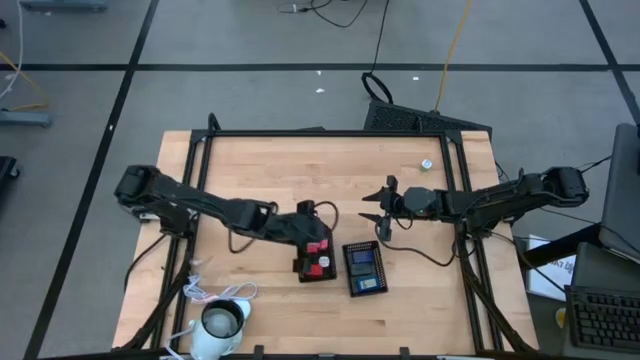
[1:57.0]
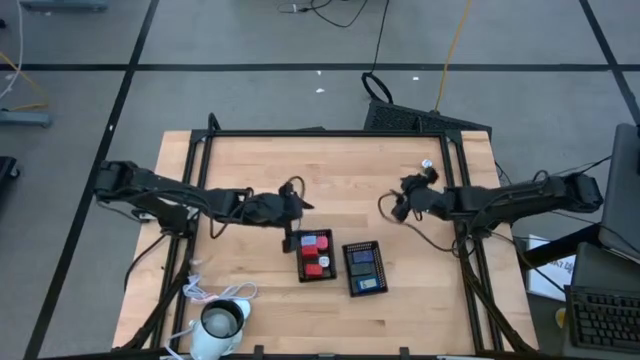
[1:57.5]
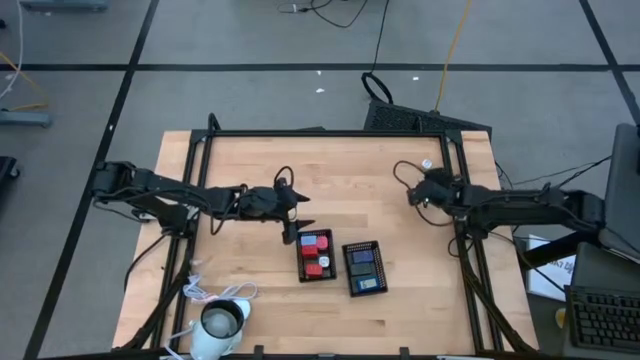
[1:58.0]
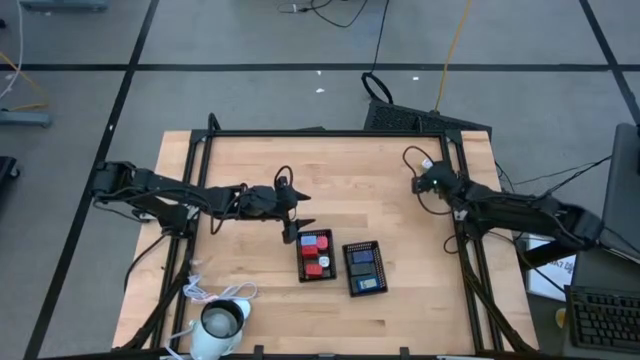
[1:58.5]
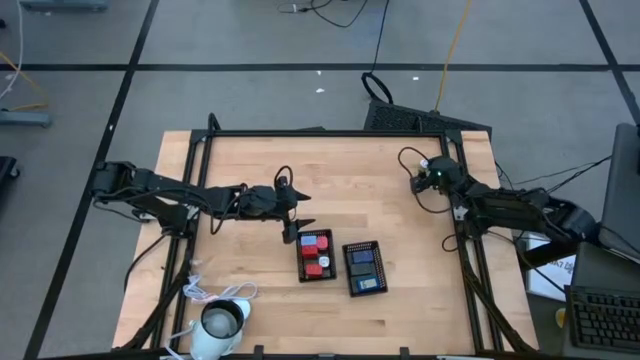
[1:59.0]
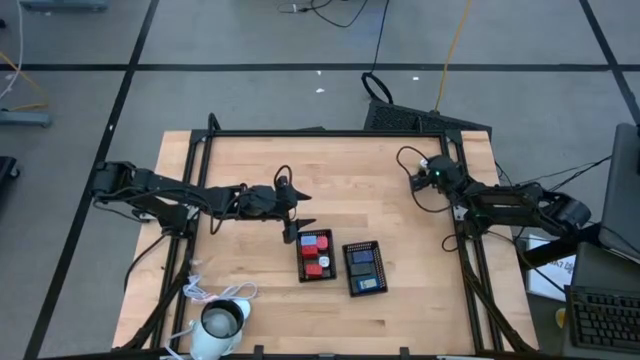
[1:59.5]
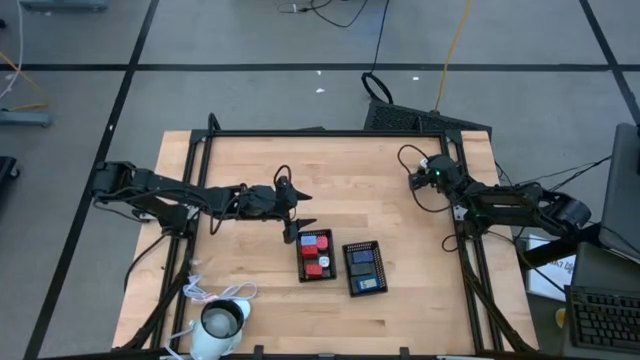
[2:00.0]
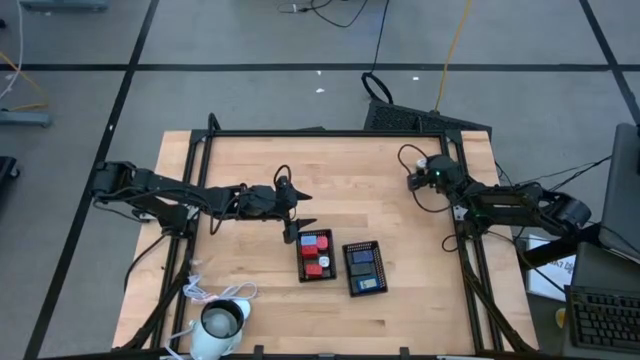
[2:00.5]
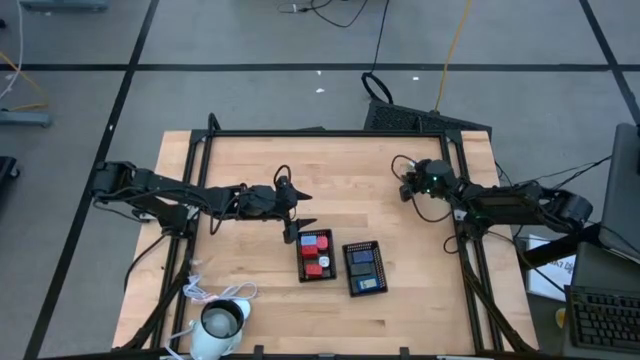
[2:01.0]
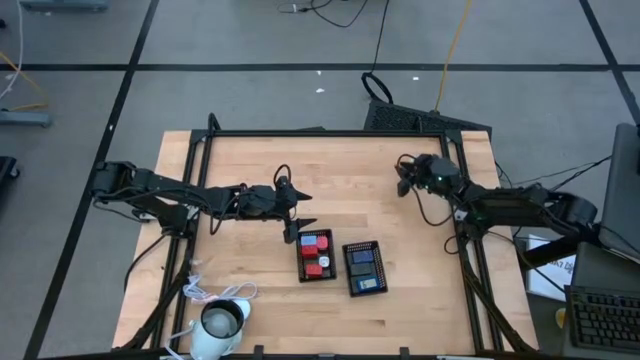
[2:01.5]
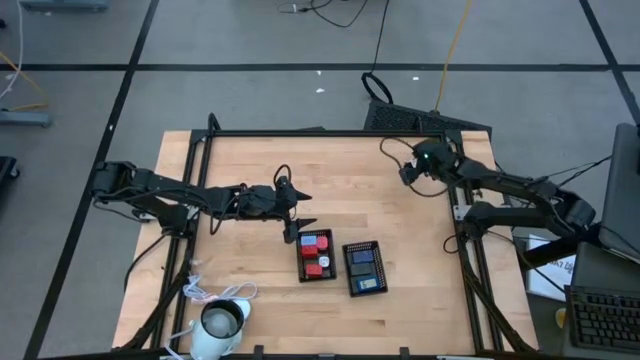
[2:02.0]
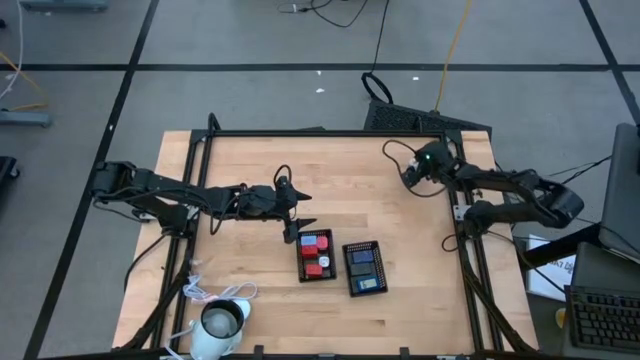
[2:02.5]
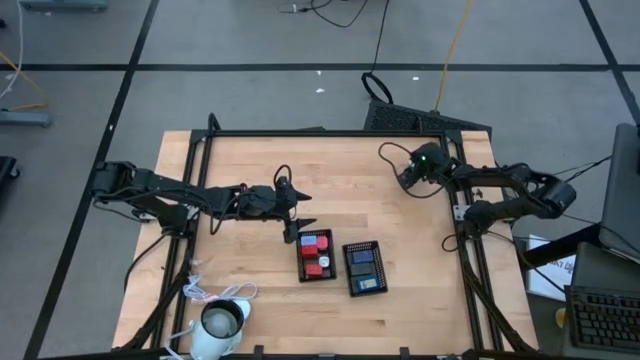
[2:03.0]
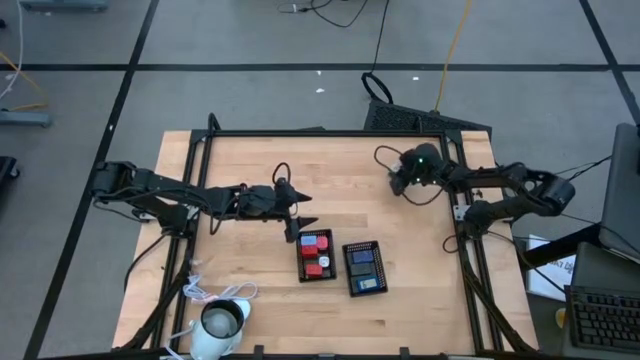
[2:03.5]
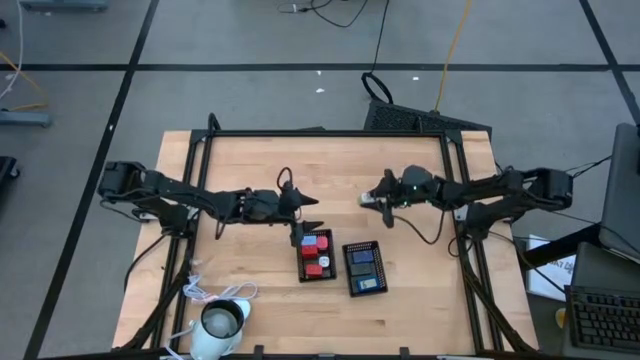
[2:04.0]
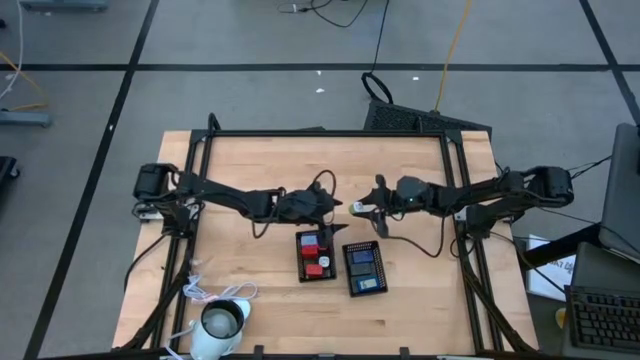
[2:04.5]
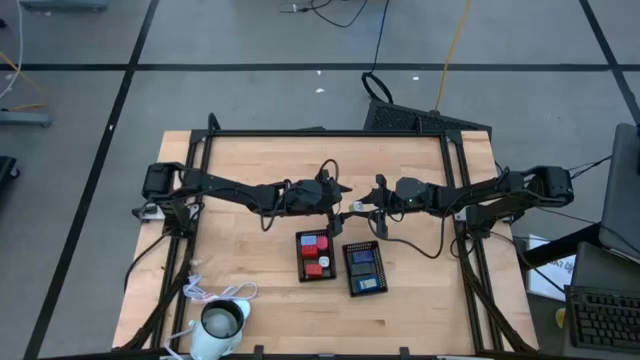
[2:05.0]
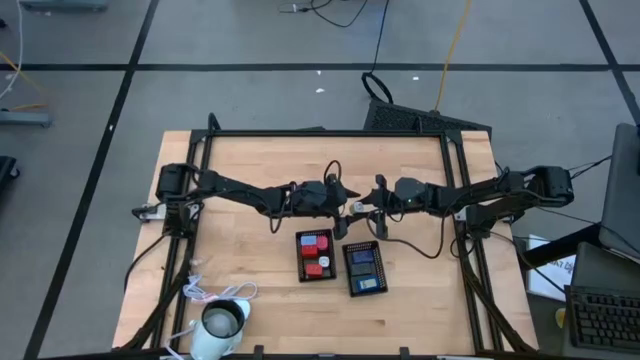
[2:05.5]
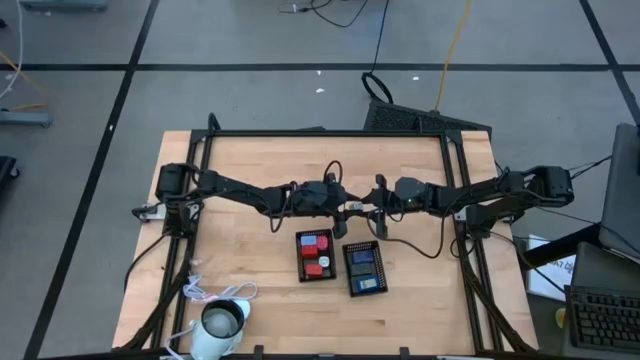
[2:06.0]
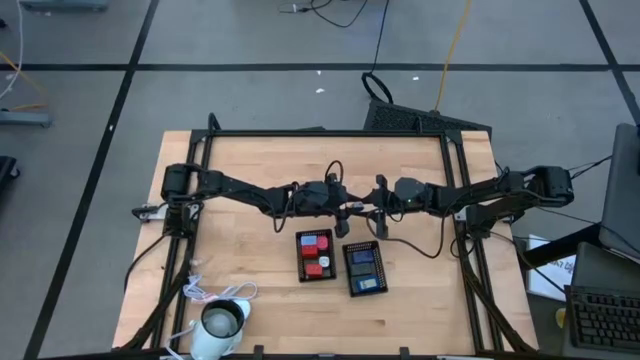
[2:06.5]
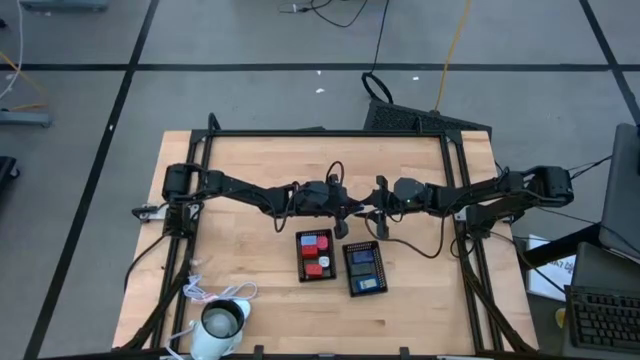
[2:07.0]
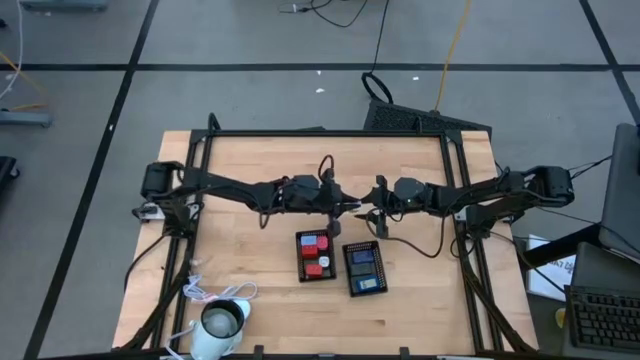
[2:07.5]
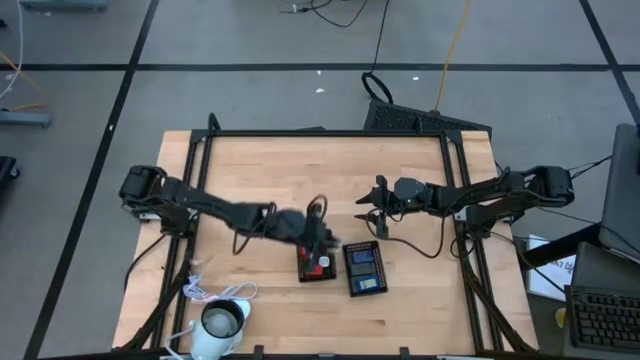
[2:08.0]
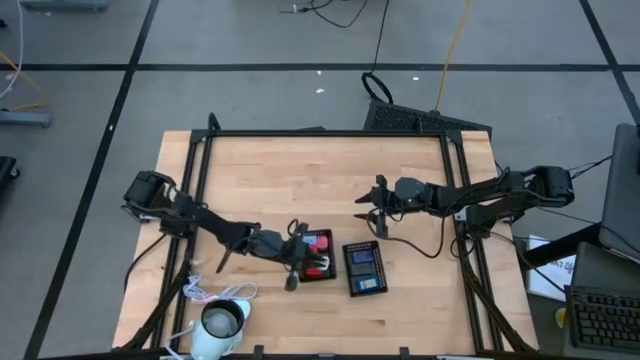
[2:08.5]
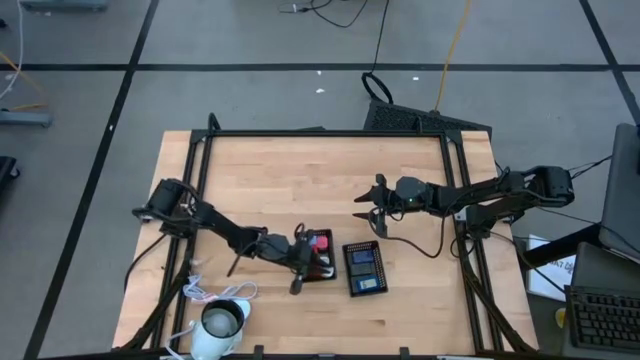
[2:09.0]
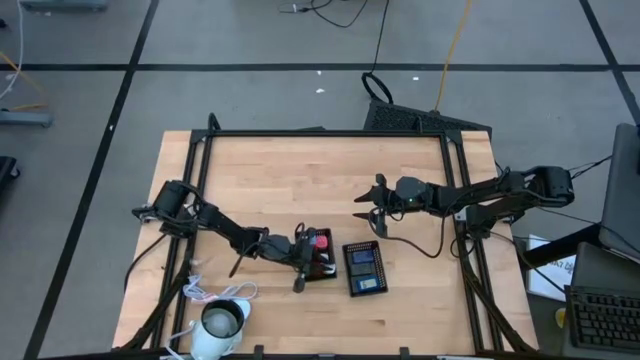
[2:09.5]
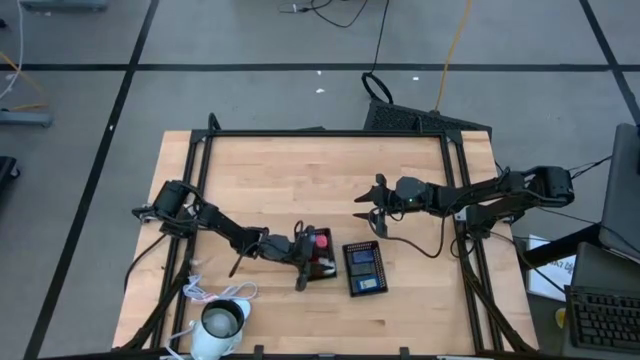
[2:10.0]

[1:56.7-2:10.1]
Task: Pick & Place Office items
Put the light green charger adapter into the left basket
